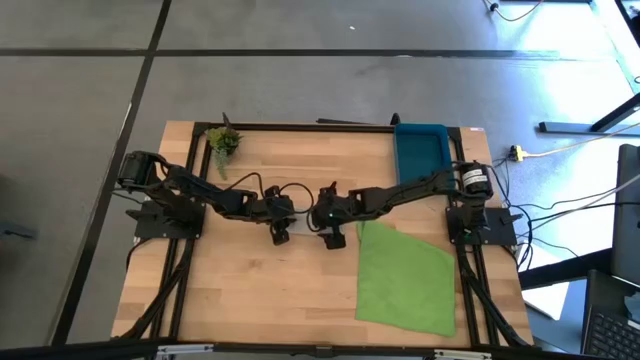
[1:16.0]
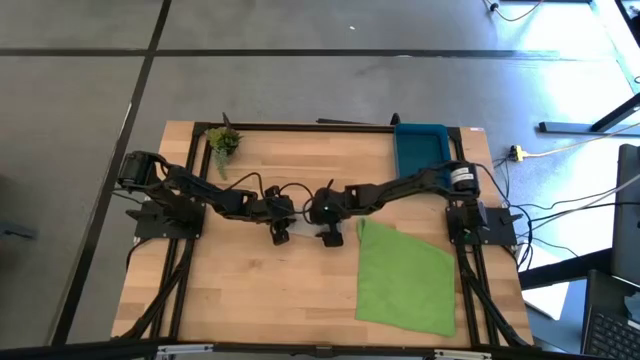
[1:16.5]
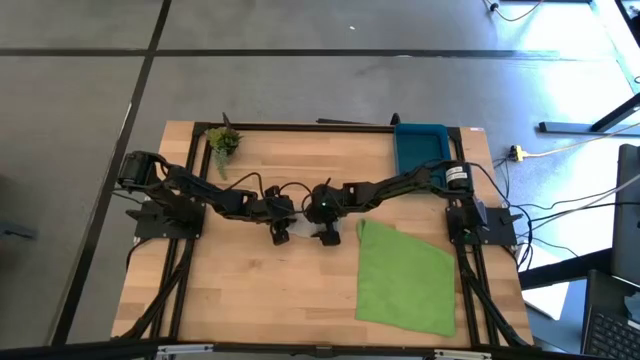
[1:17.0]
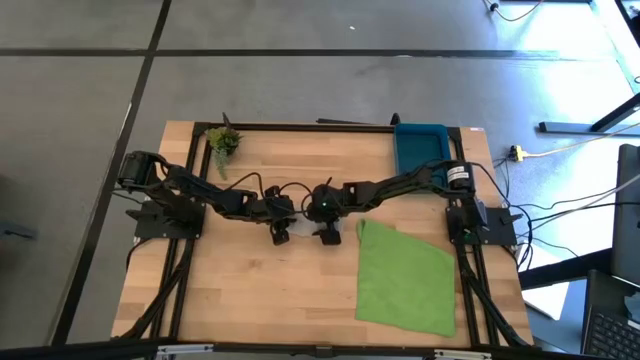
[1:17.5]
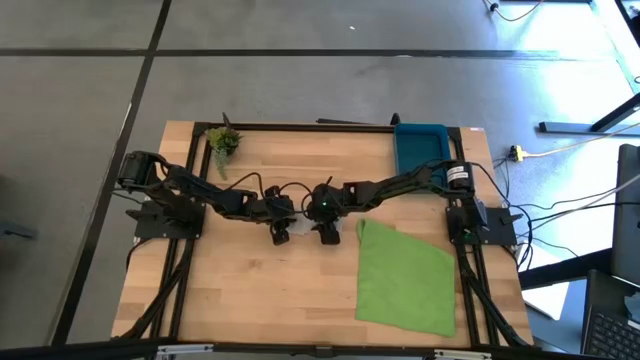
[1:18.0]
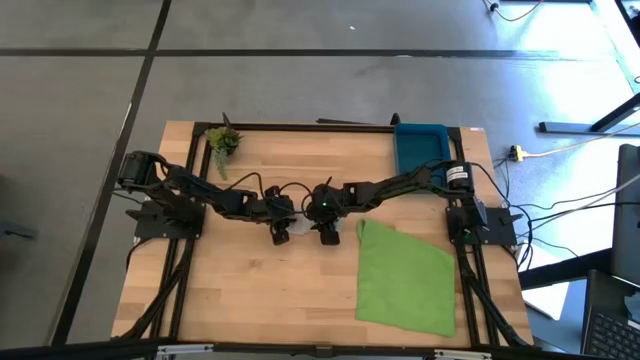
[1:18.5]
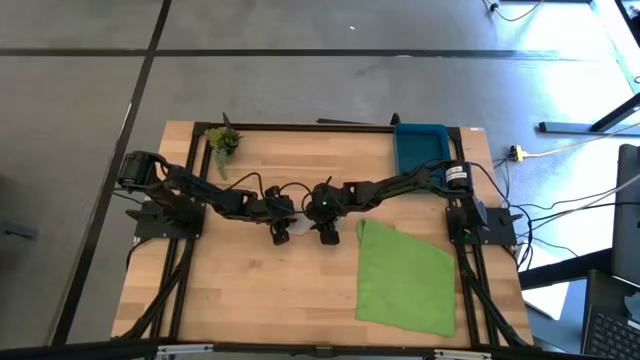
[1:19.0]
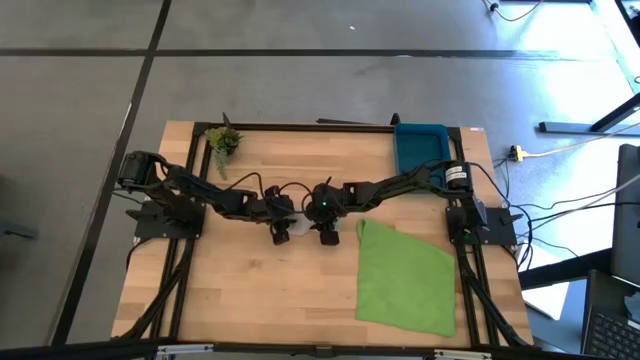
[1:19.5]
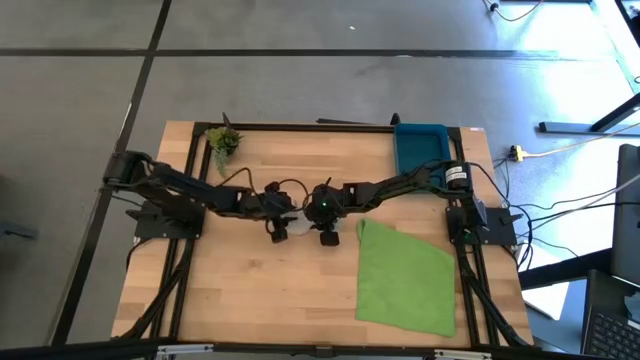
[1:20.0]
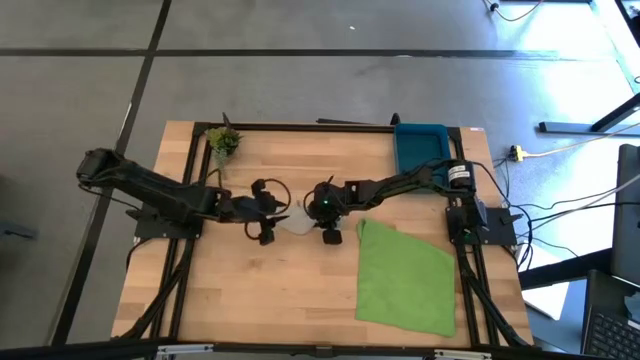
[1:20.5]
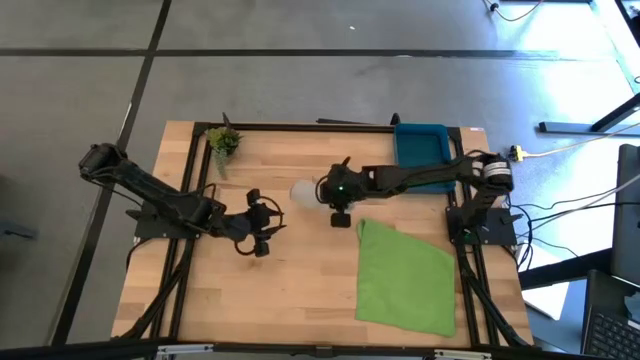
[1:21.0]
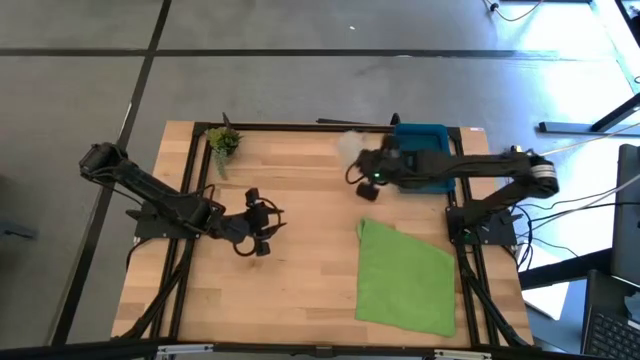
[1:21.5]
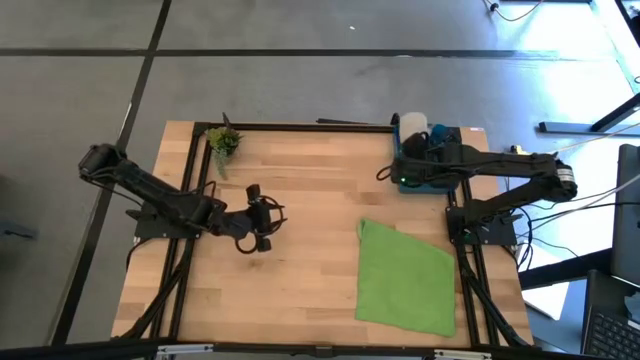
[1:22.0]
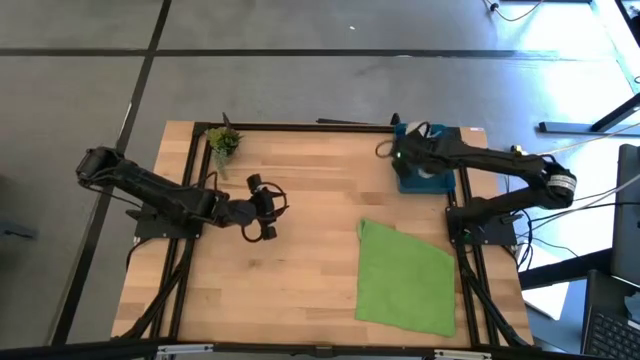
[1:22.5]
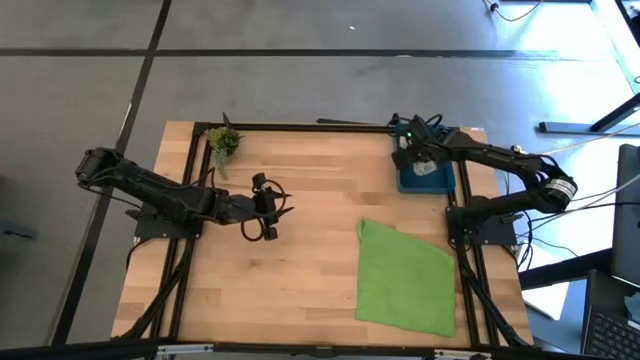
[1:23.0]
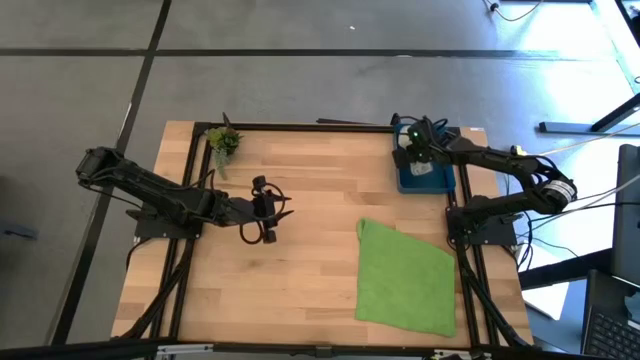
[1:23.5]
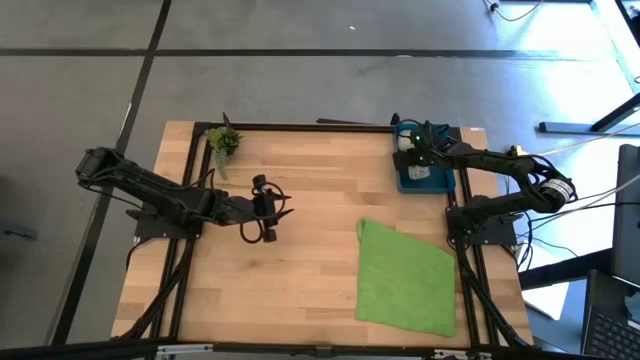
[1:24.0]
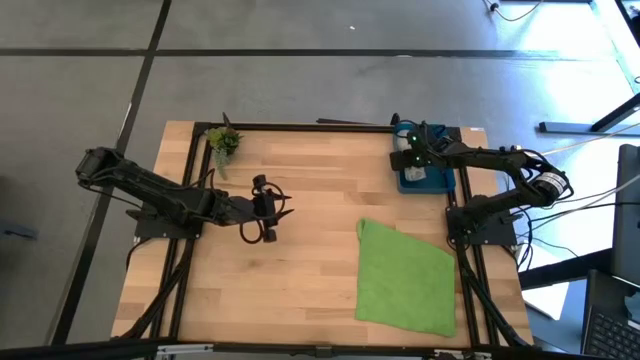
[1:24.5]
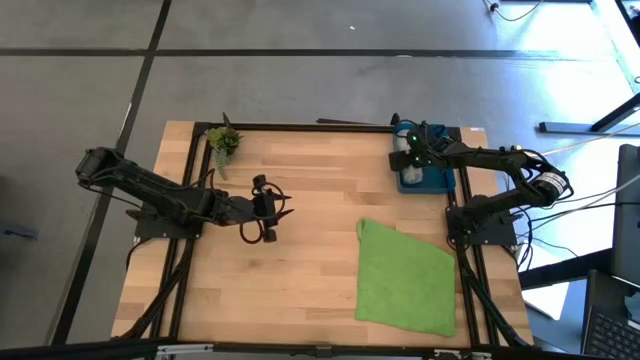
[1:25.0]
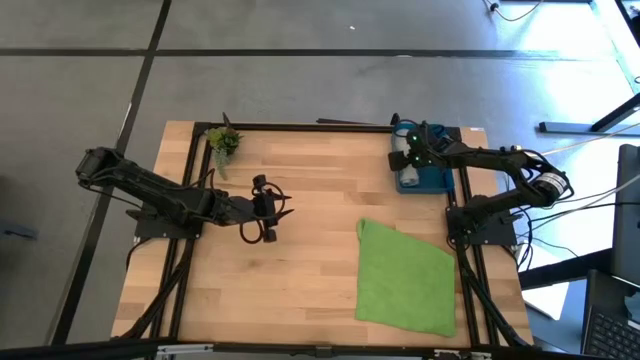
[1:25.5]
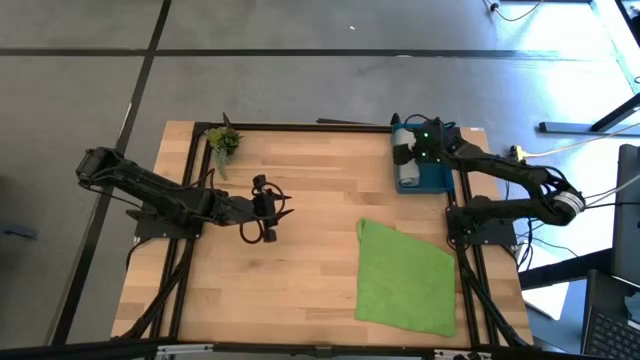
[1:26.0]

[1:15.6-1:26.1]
Task: Roll microfiber towels into tight, uniform cylinder then place into a basket
Put the gray towel into the blue bin

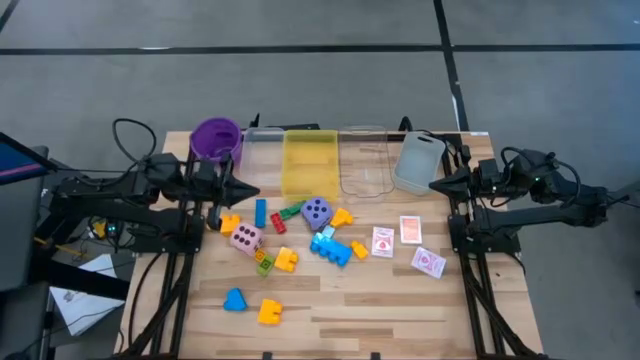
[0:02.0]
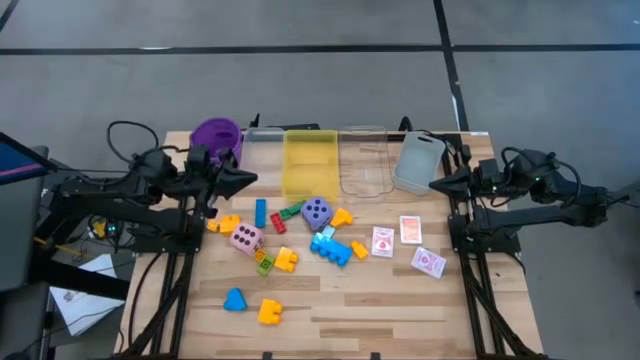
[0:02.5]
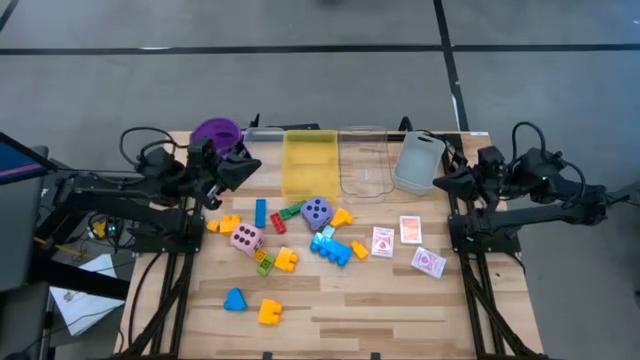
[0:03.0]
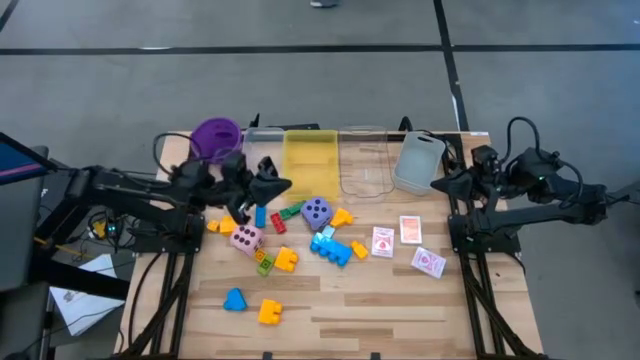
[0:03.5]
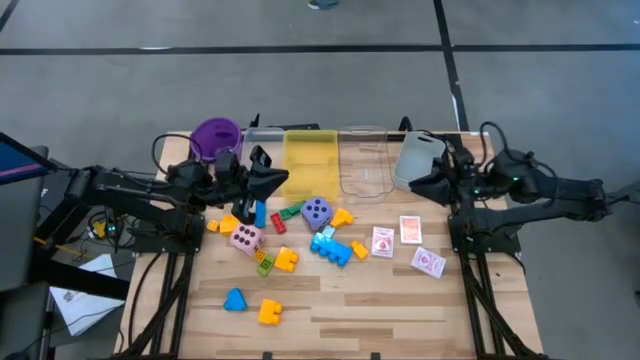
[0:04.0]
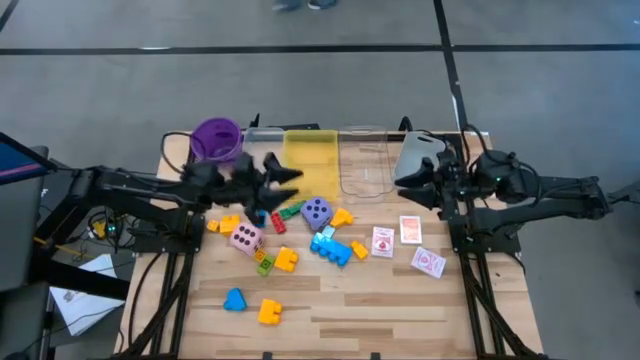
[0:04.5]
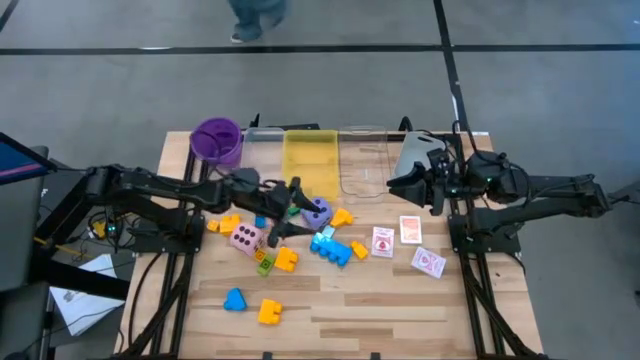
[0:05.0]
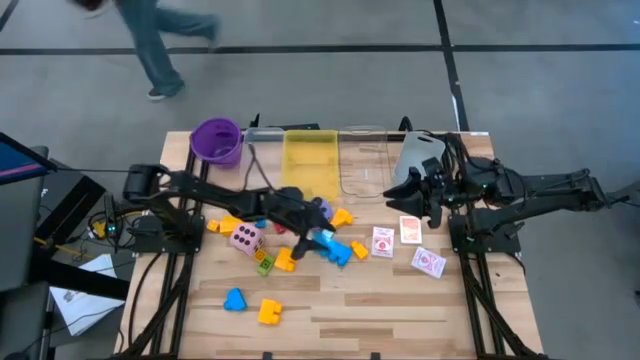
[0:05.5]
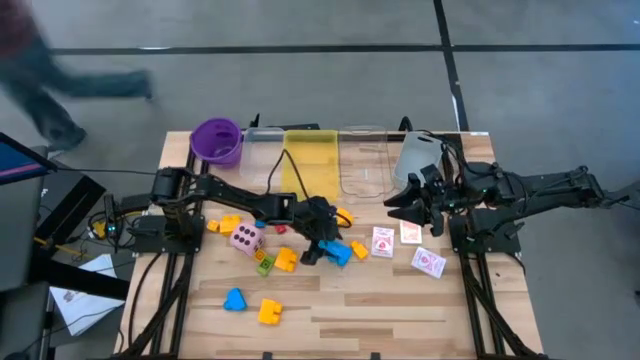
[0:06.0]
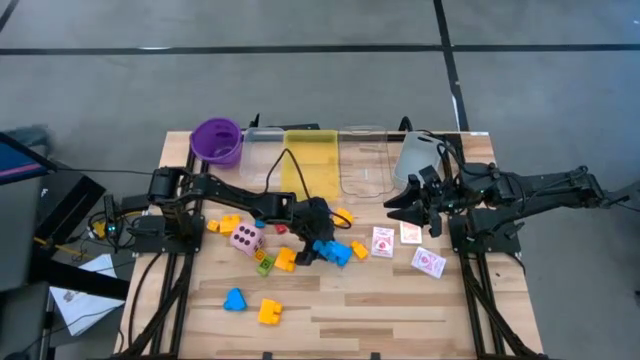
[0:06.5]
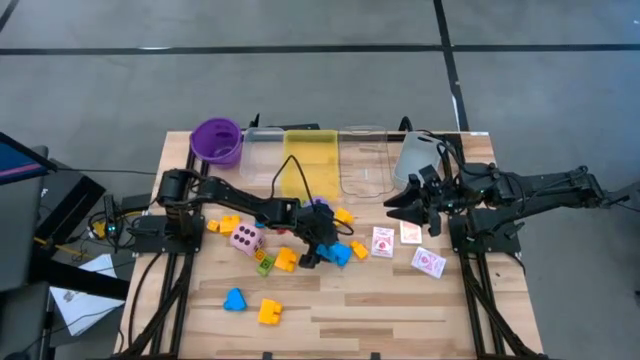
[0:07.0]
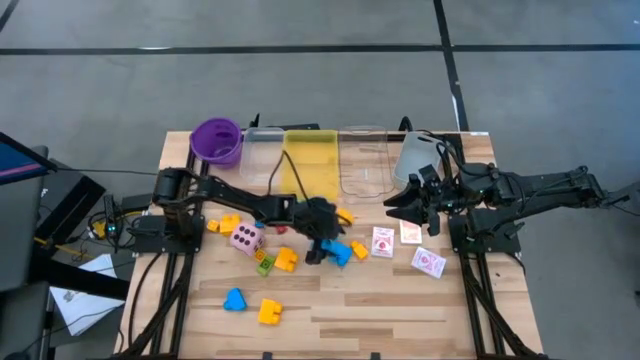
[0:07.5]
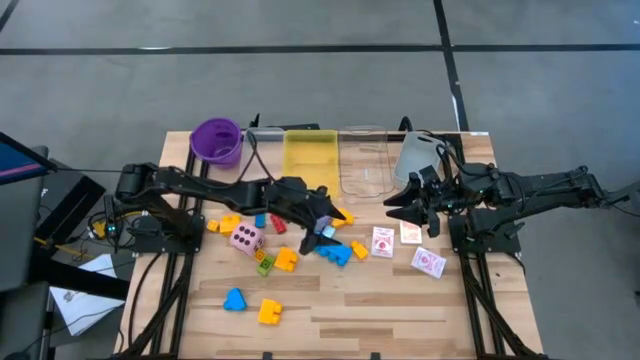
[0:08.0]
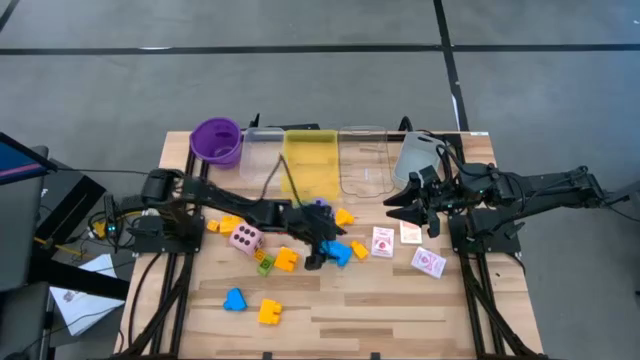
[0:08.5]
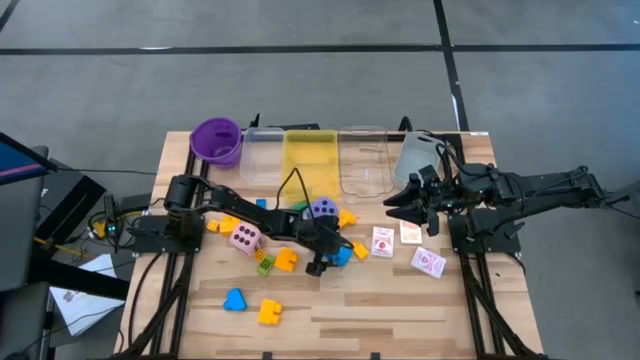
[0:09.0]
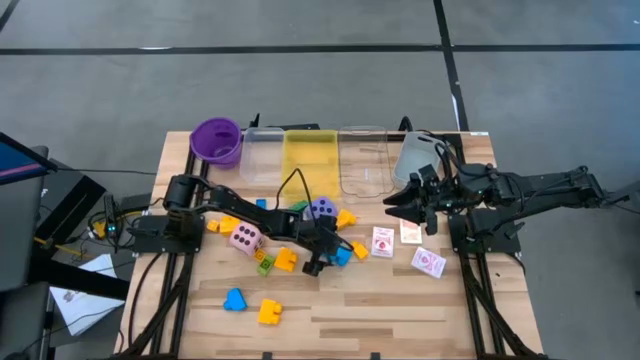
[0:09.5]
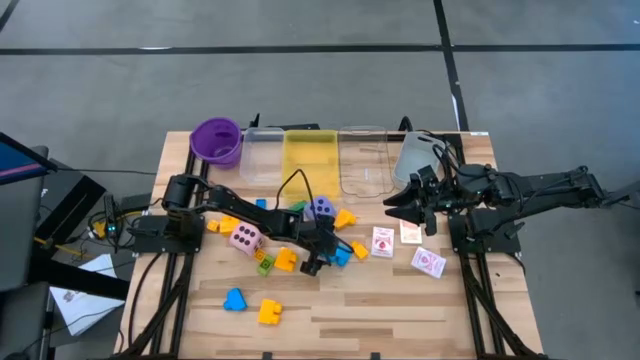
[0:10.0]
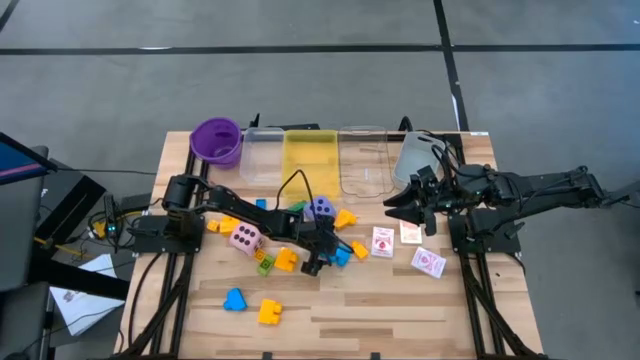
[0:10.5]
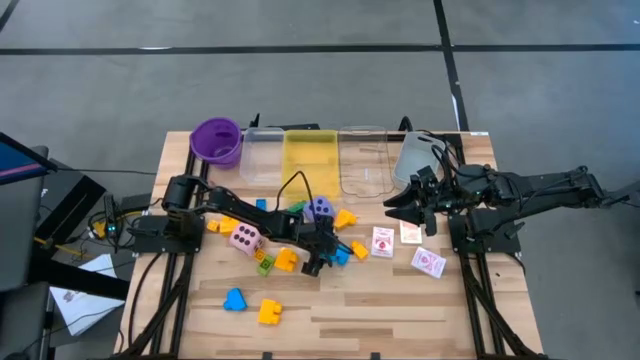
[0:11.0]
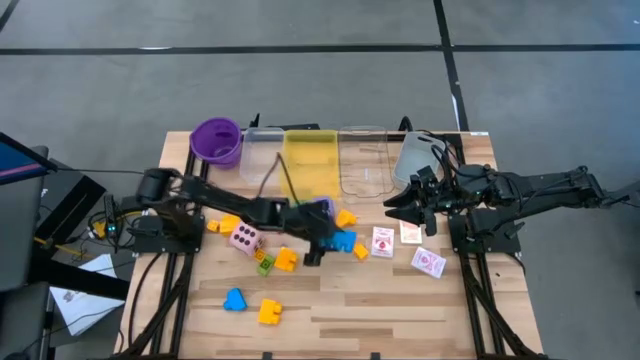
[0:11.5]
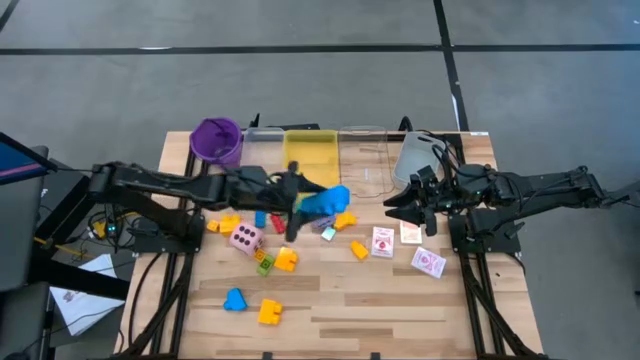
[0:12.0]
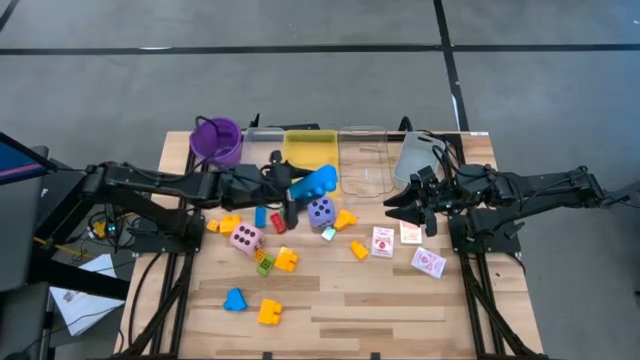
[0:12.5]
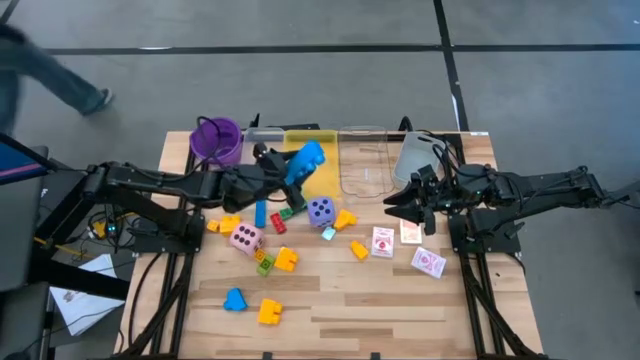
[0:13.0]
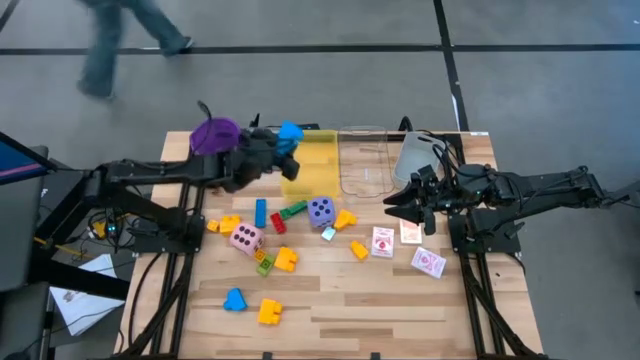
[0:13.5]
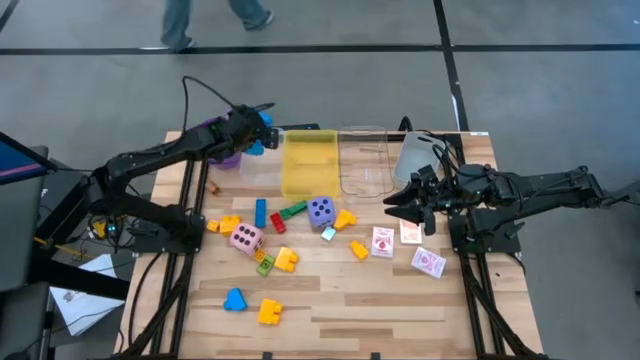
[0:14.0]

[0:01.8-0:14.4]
Task: Pick & Place Toys
Put the right blue stud game piece into the left transparent bin
